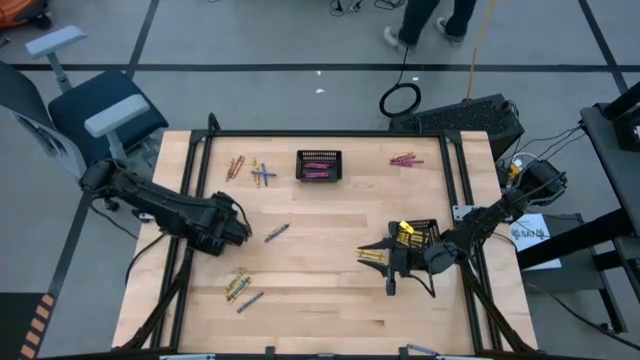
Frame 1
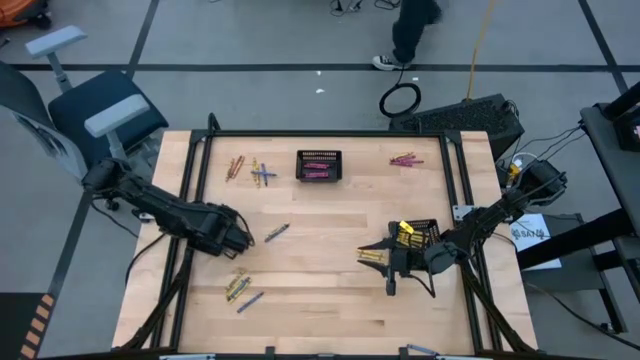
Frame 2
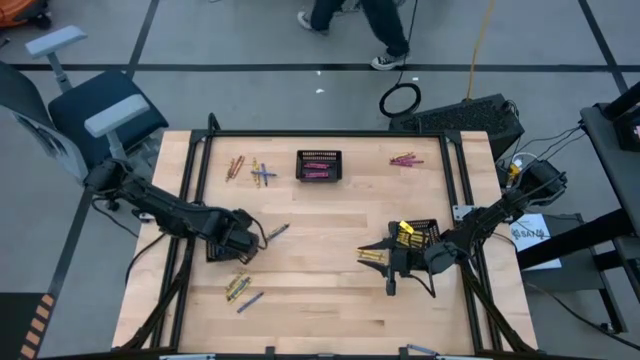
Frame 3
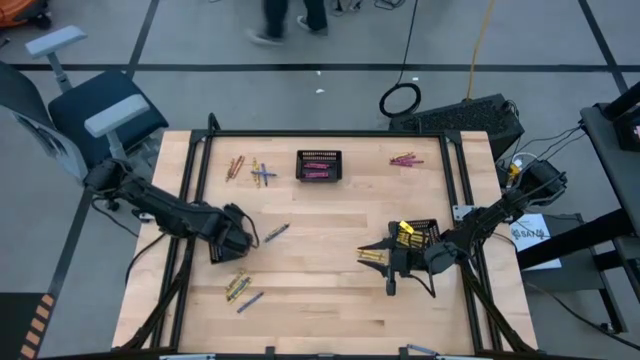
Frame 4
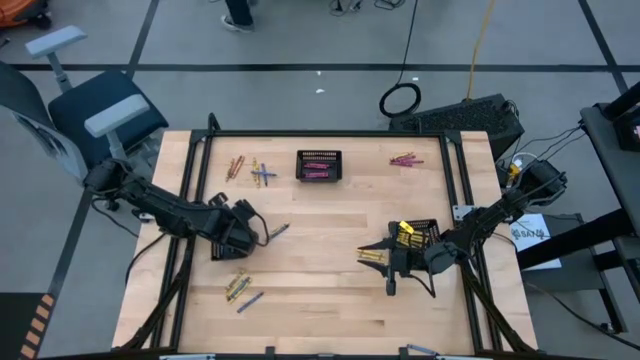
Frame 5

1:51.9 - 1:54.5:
Task: Sort crayons
Adjust the bottom left black bin

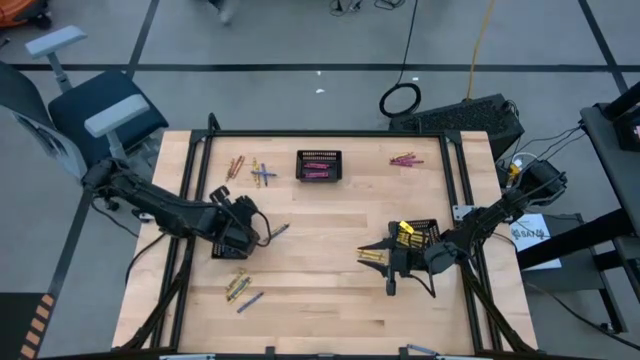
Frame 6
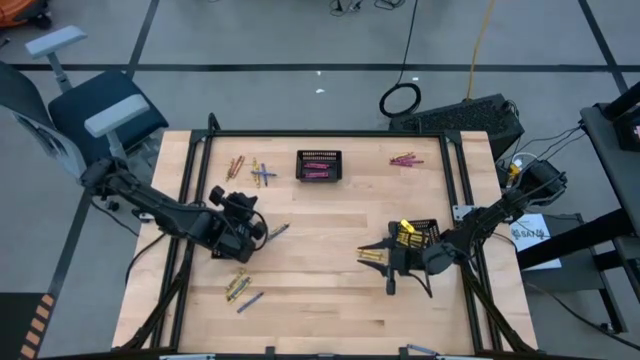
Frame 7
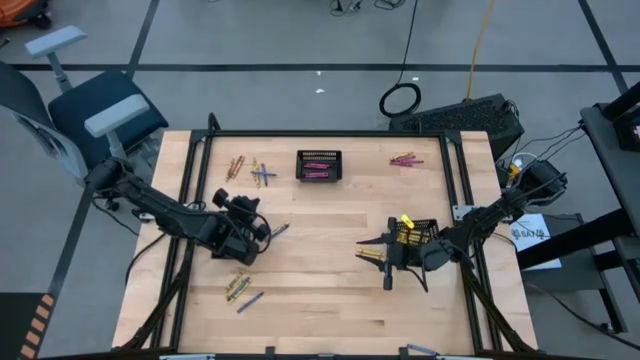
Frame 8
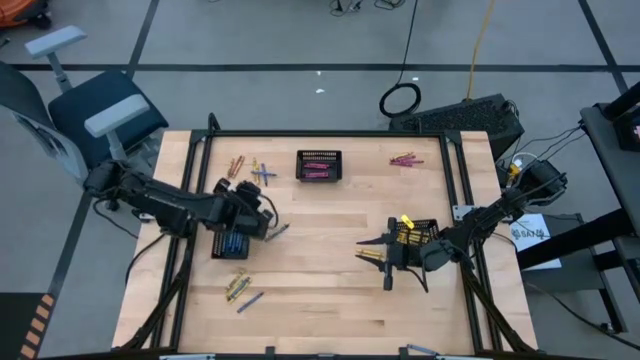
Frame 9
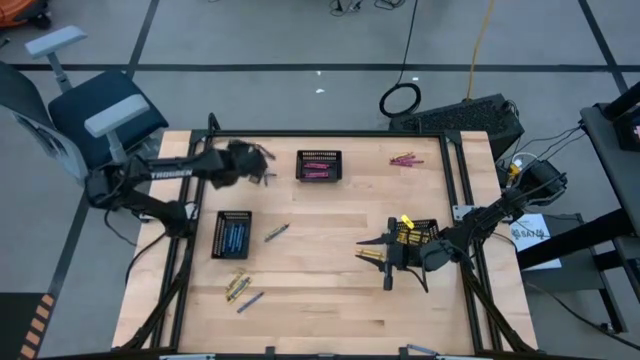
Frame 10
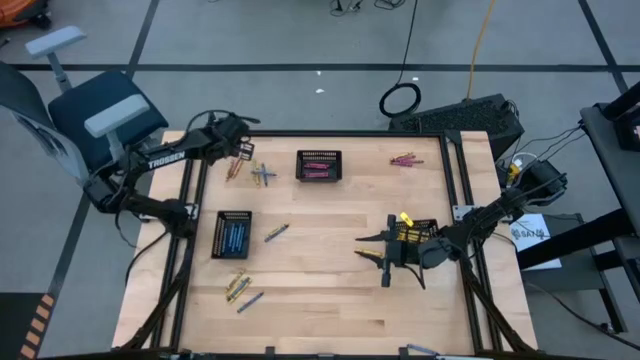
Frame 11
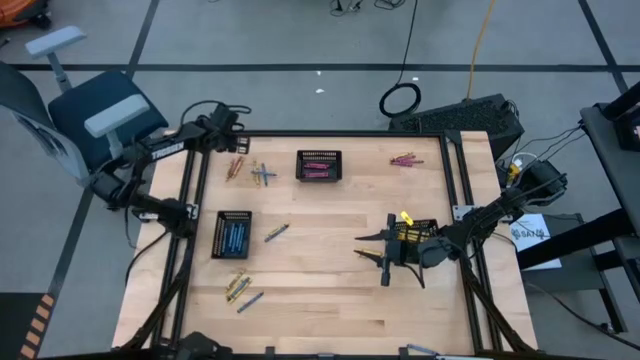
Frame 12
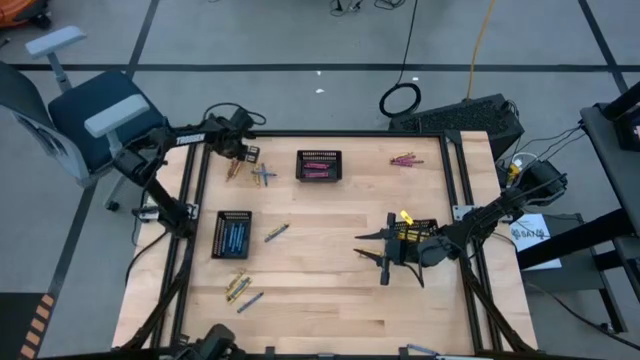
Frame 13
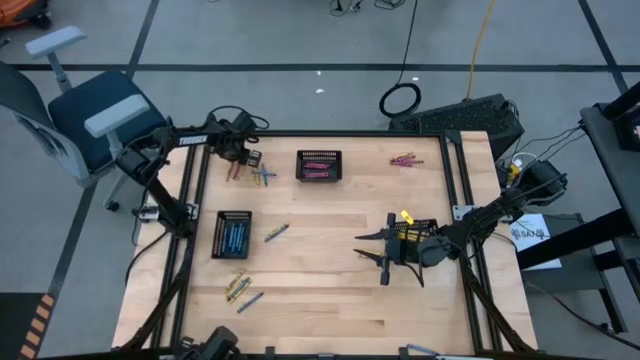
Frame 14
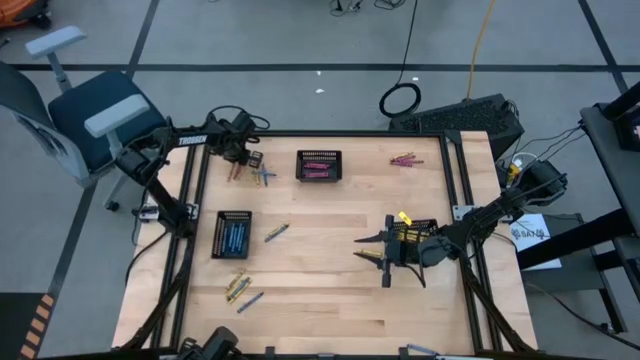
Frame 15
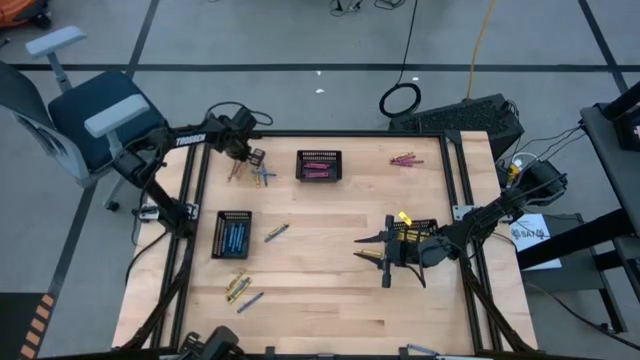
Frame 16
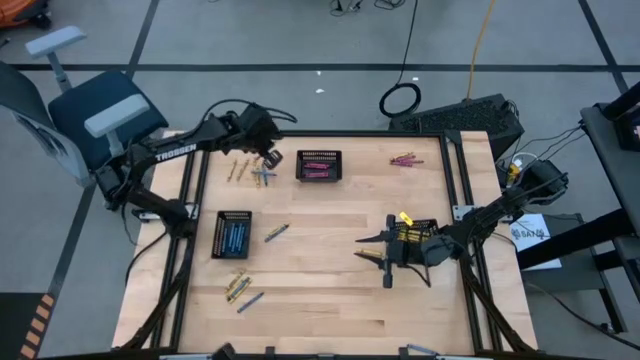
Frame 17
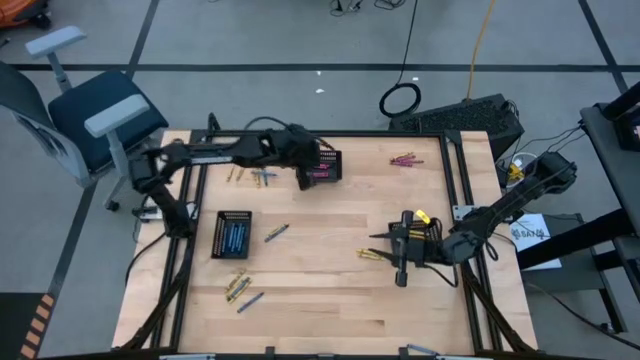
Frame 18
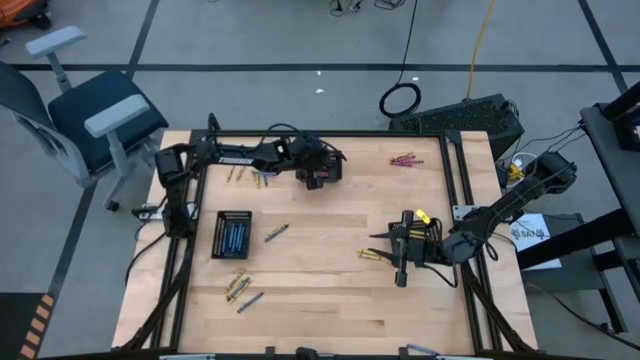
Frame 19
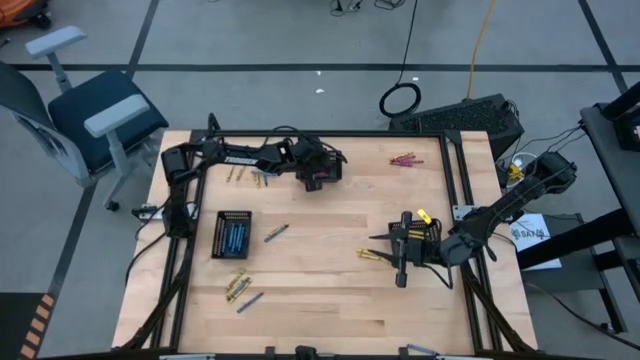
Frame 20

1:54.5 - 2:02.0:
Put the red crayon into the top black bin

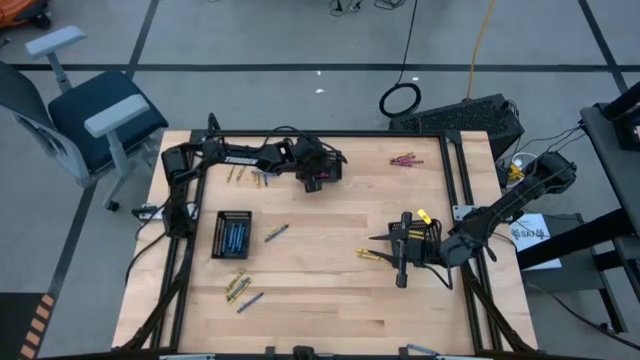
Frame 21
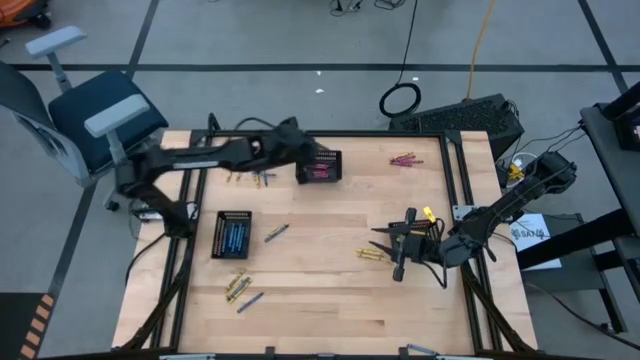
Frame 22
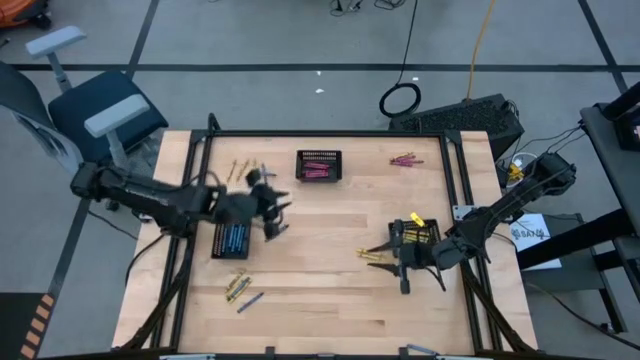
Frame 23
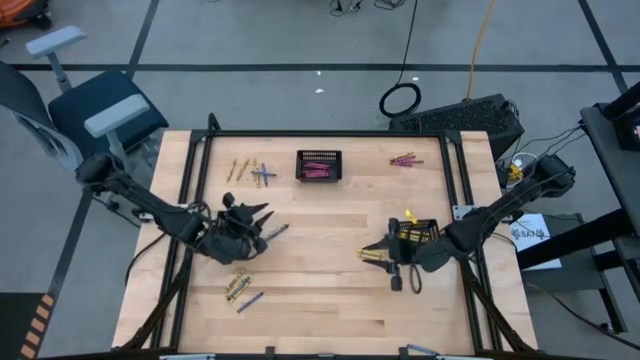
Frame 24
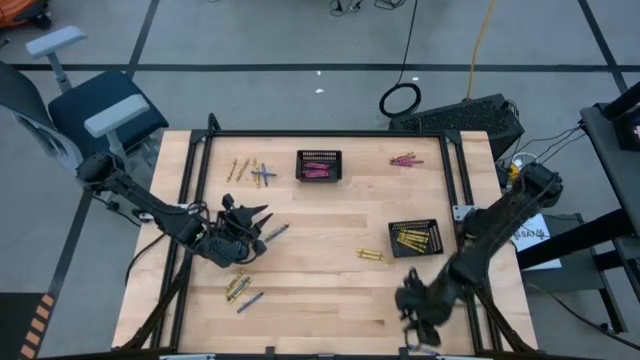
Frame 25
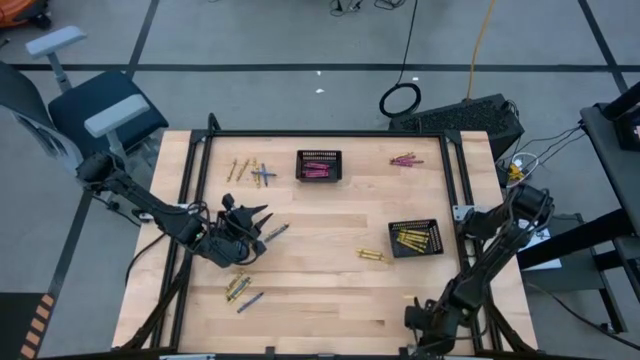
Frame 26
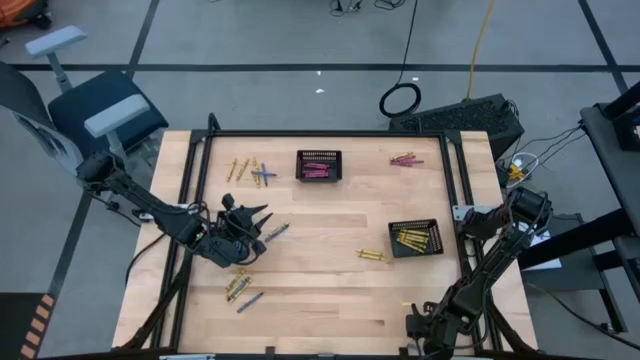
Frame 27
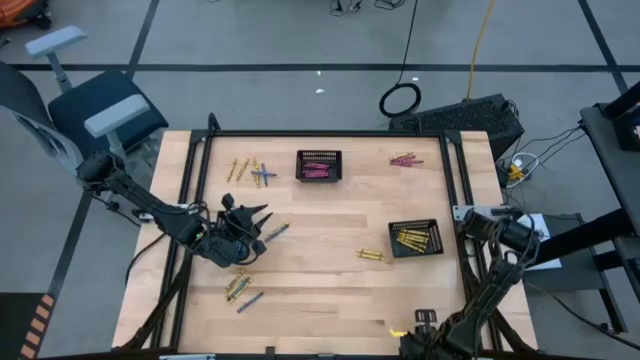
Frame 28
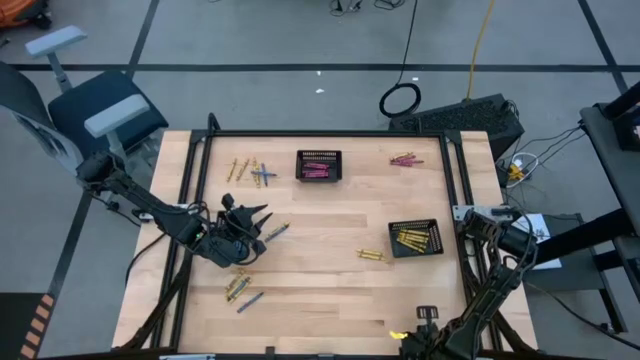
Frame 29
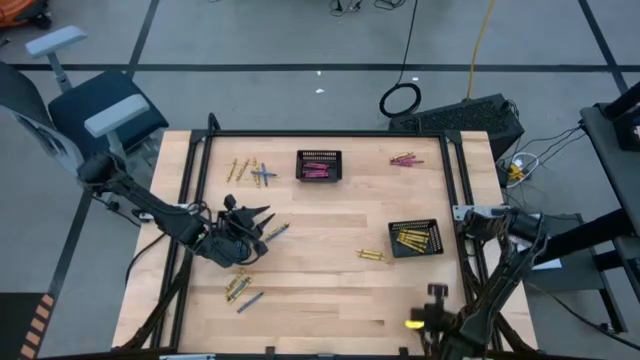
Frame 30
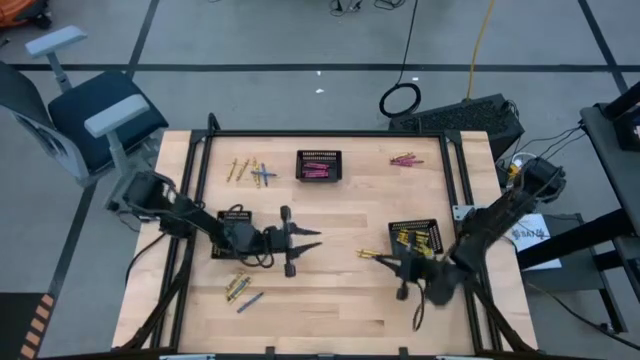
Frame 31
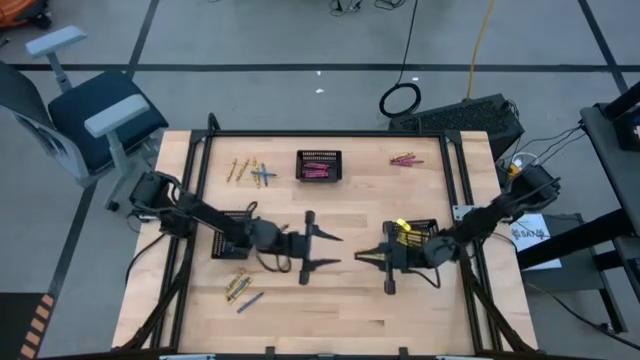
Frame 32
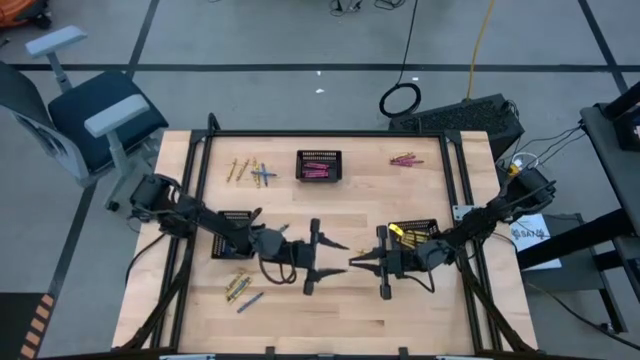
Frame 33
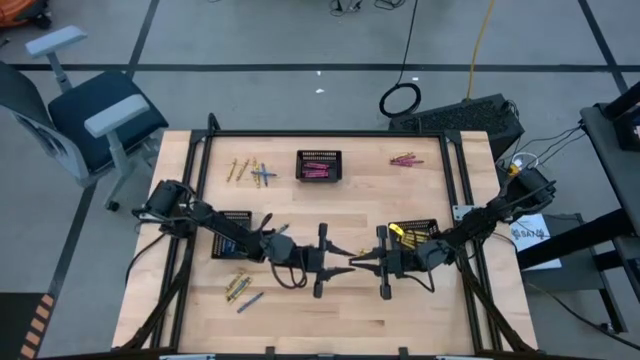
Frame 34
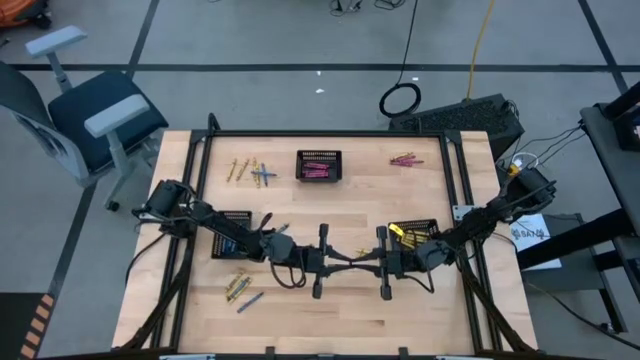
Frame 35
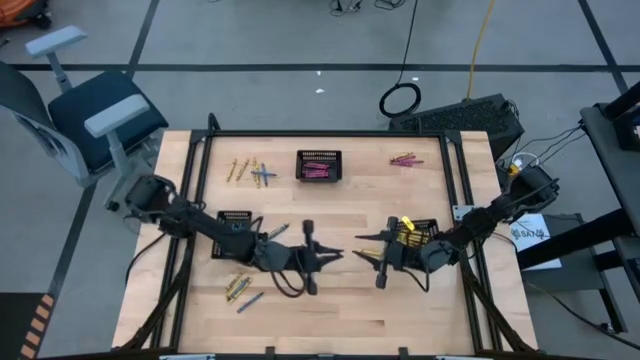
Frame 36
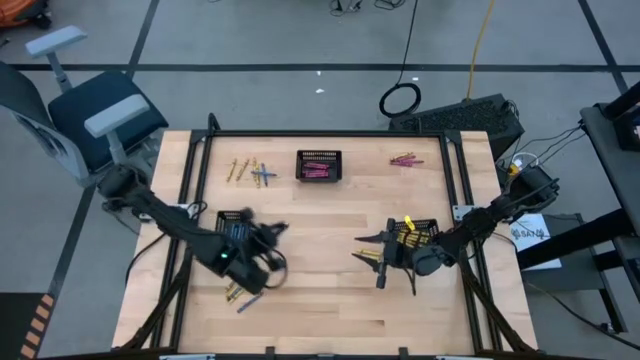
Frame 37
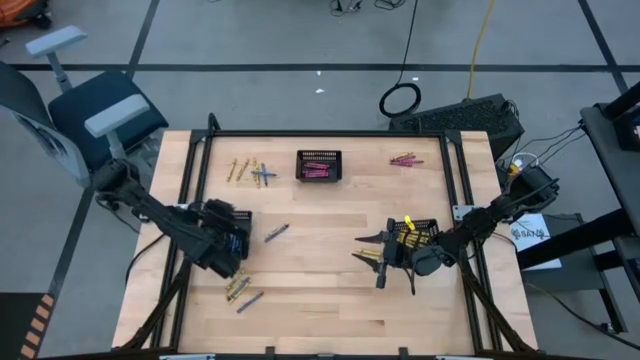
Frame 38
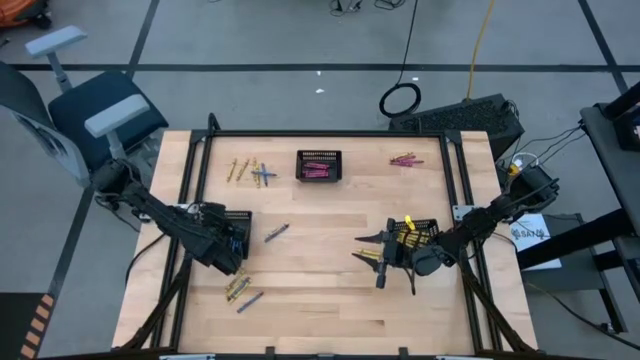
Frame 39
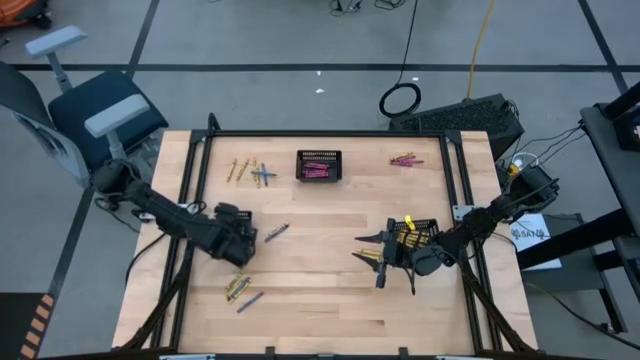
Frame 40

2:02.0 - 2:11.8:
Put the blue crayon into the bottom left black bin

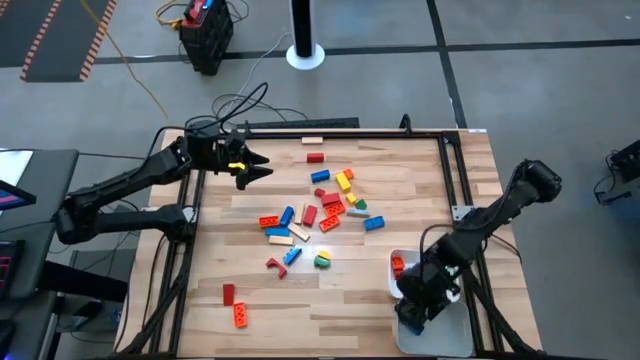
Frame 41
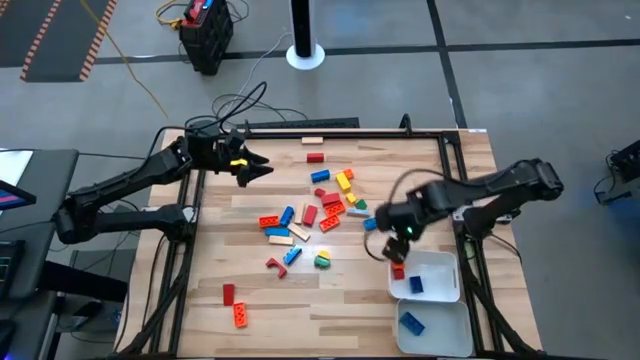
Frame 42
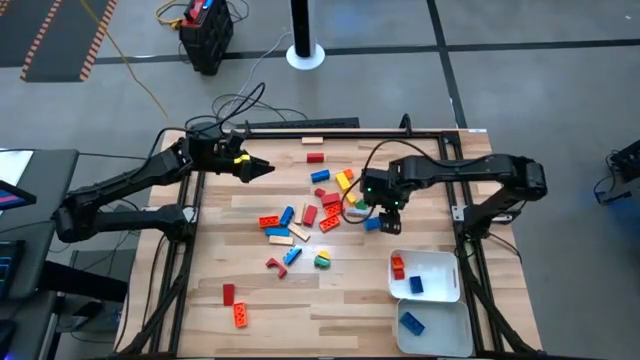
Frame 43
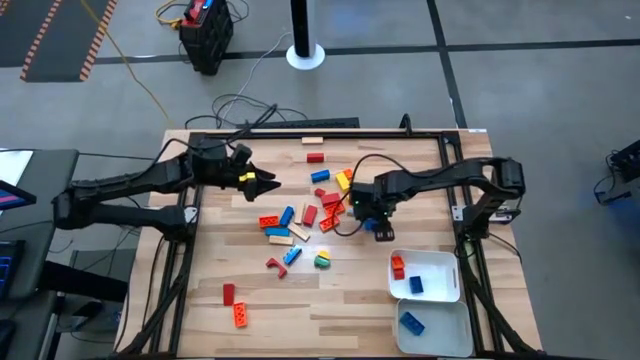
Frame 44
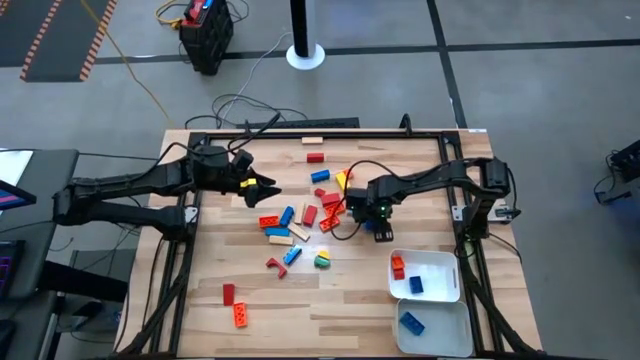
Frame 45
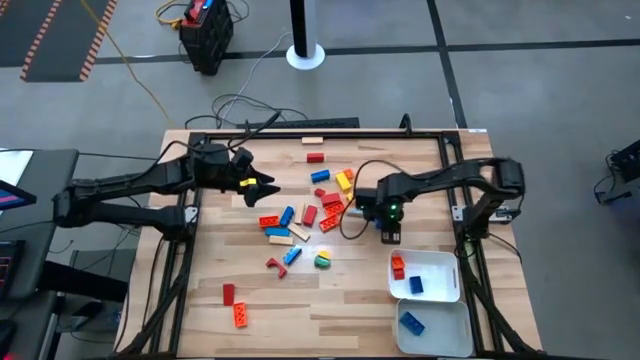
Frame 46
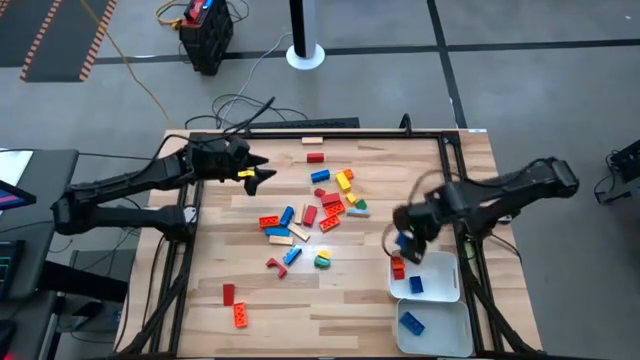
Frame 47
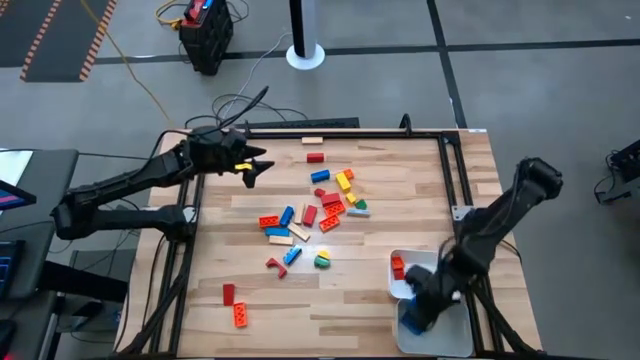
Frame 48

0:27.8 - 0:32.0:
Task: Sort blocks by size
Put the big blue game piece into the gray bin
